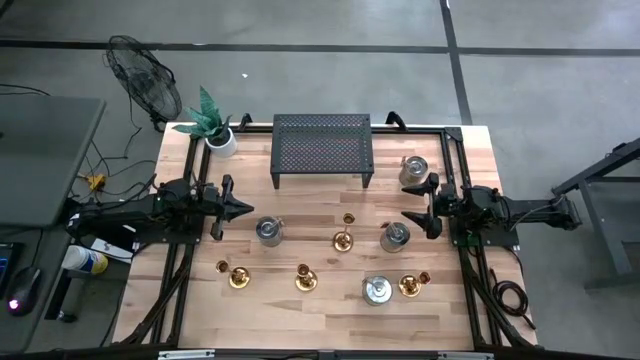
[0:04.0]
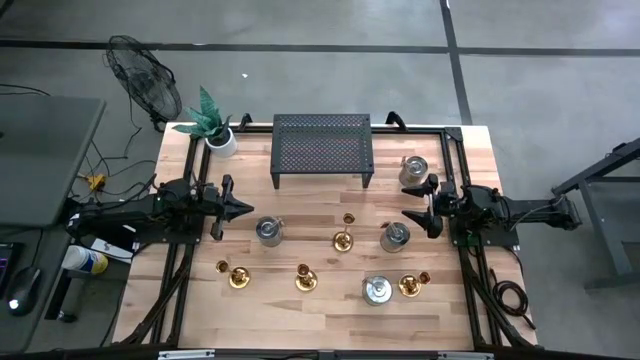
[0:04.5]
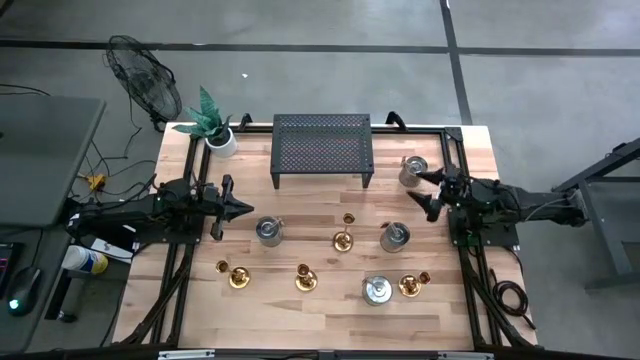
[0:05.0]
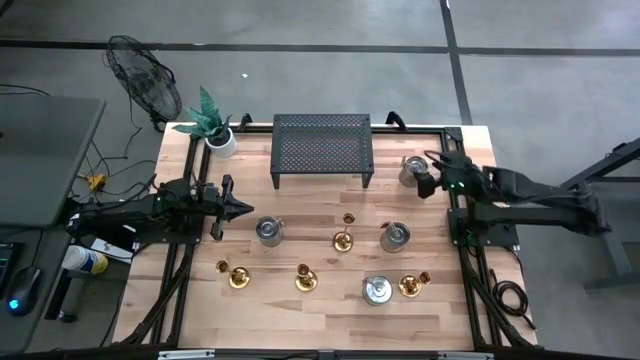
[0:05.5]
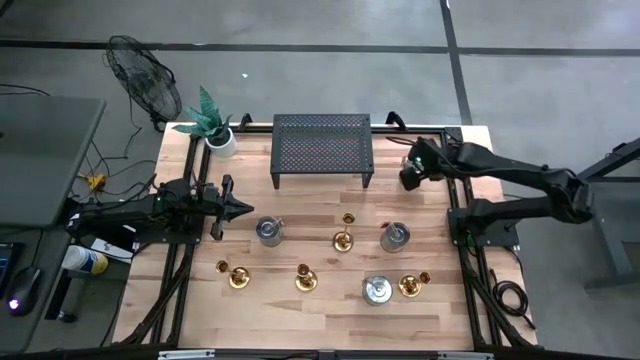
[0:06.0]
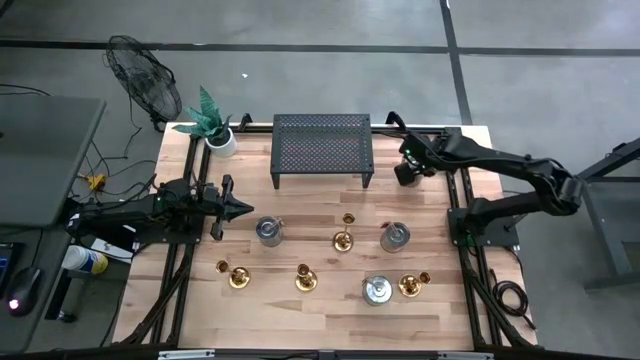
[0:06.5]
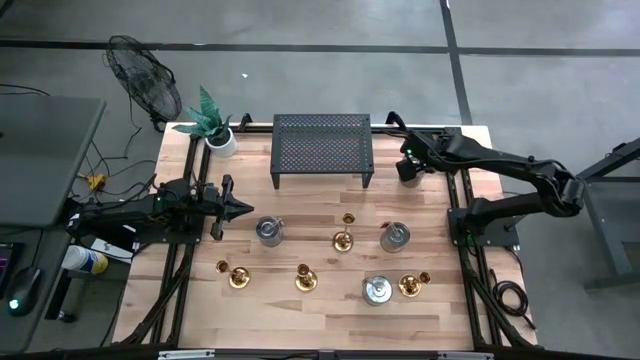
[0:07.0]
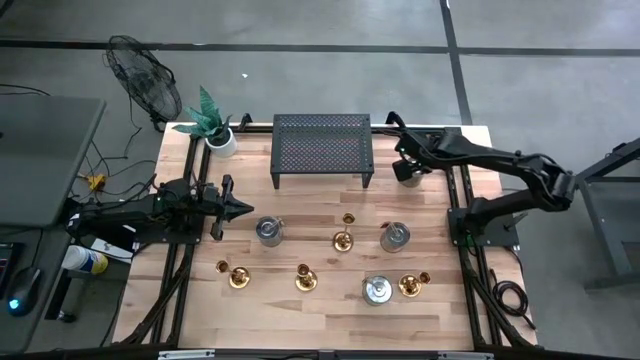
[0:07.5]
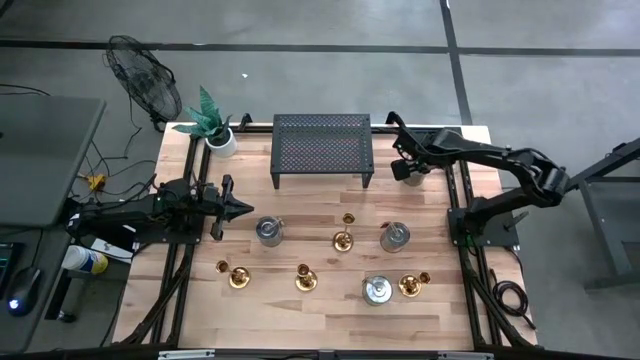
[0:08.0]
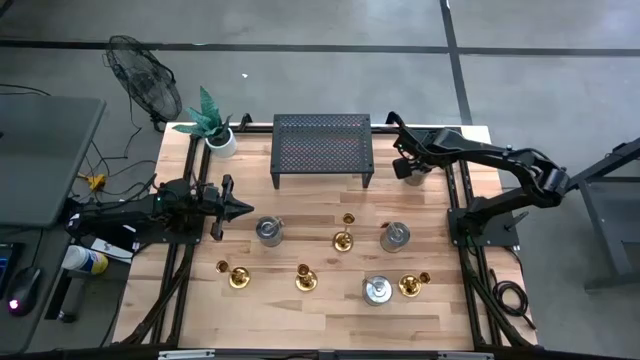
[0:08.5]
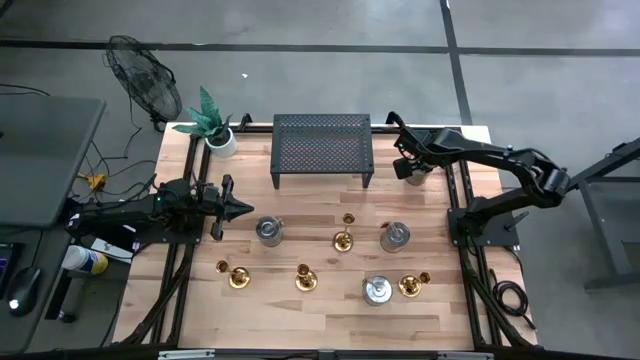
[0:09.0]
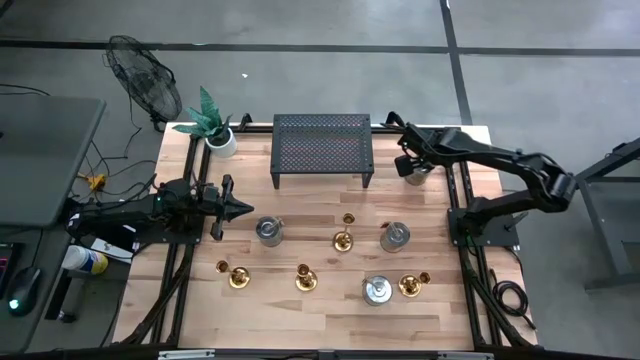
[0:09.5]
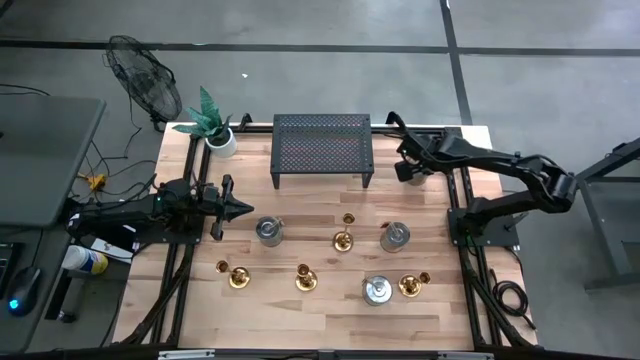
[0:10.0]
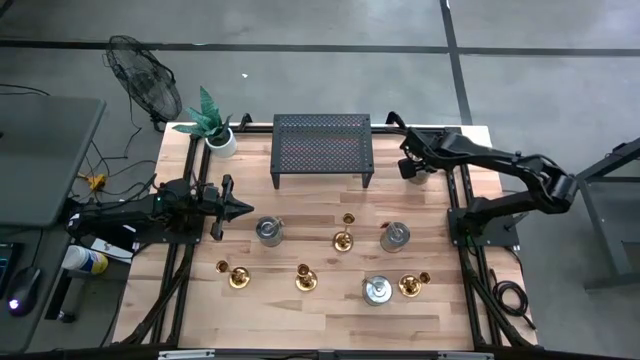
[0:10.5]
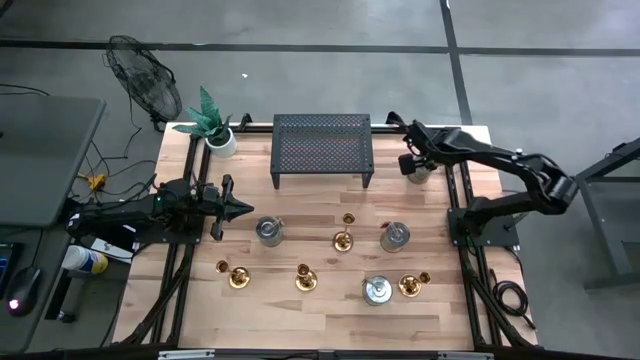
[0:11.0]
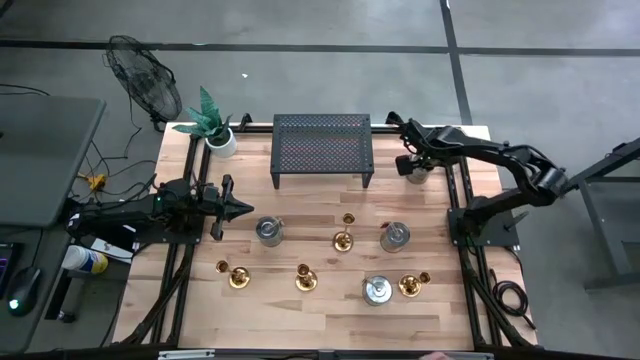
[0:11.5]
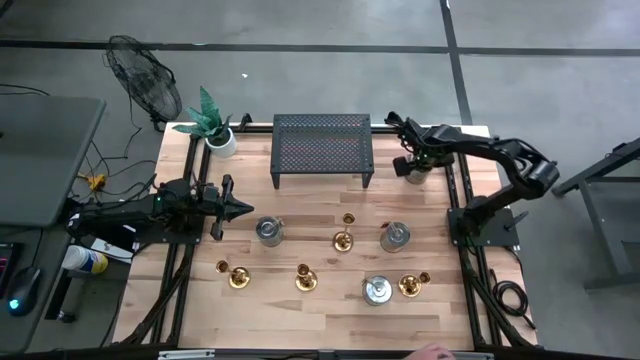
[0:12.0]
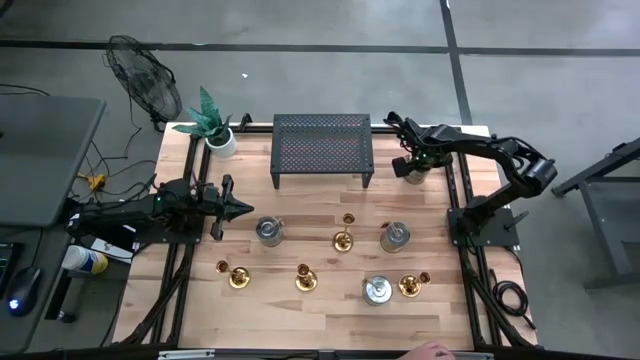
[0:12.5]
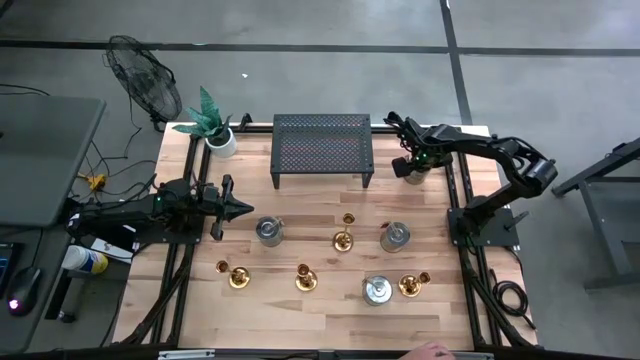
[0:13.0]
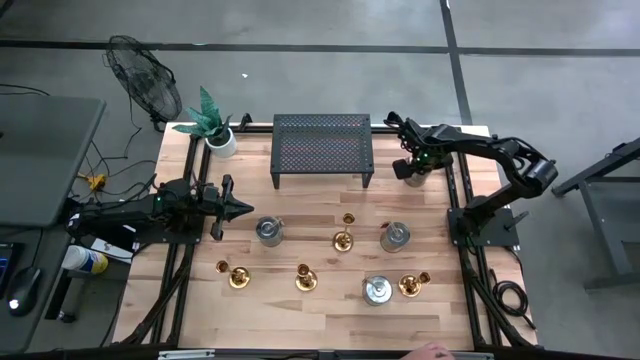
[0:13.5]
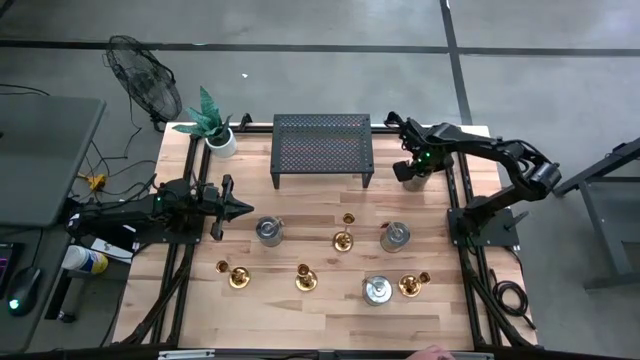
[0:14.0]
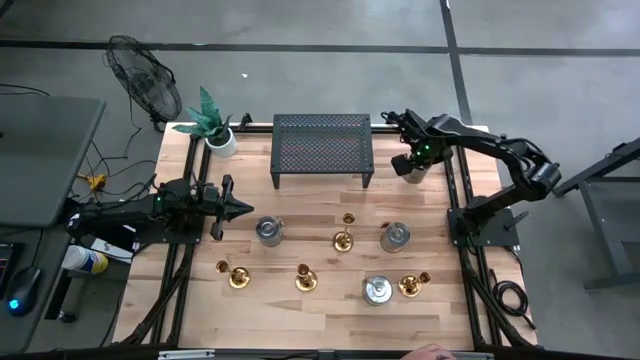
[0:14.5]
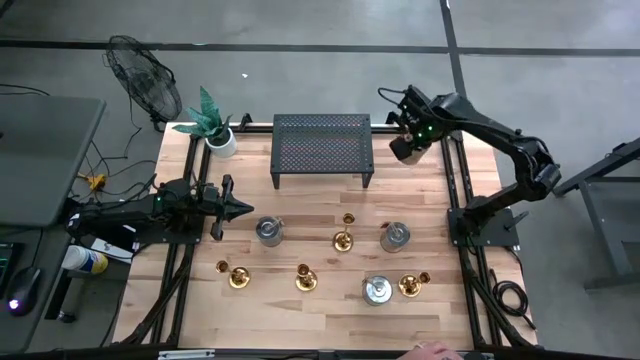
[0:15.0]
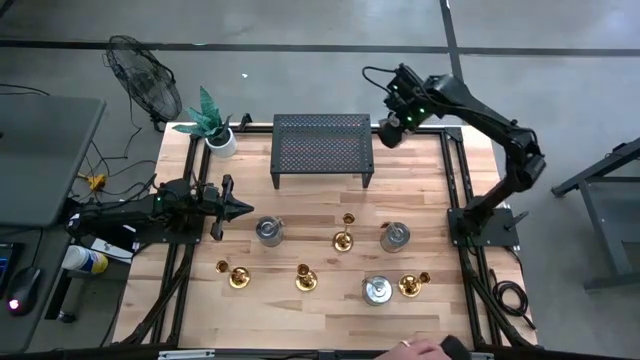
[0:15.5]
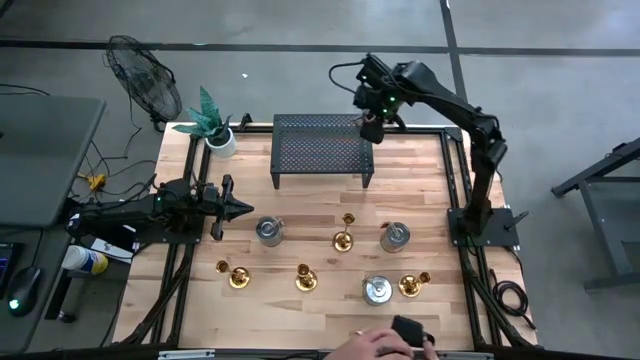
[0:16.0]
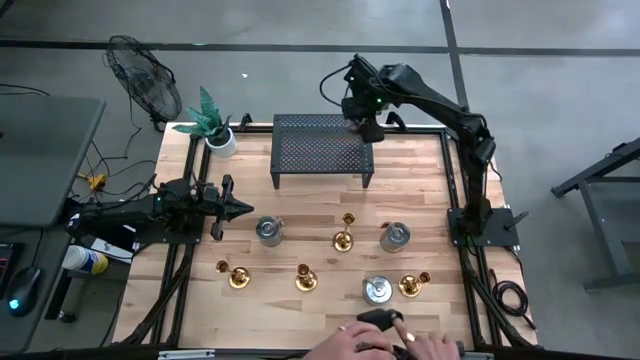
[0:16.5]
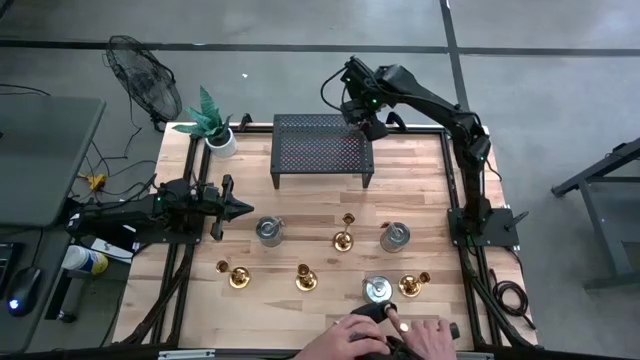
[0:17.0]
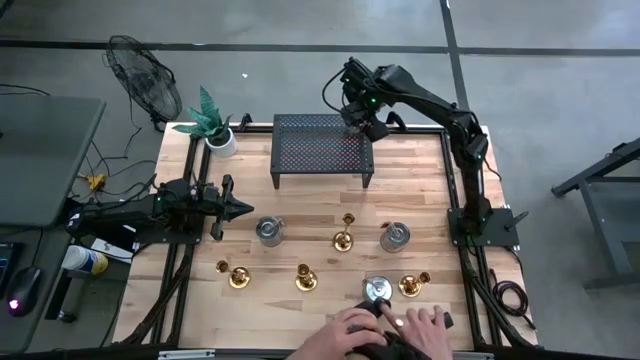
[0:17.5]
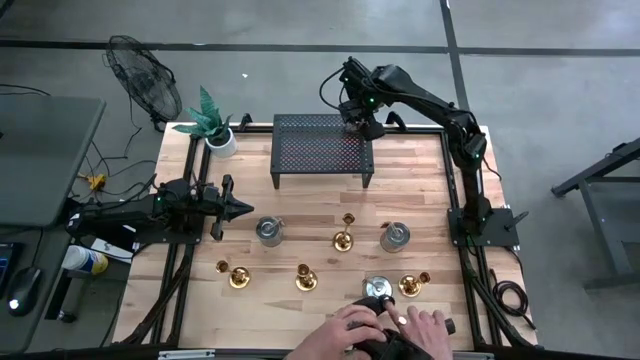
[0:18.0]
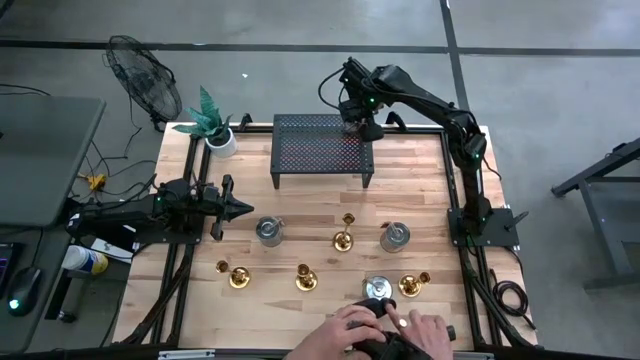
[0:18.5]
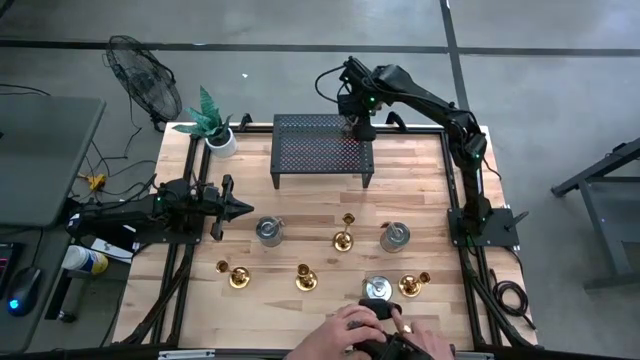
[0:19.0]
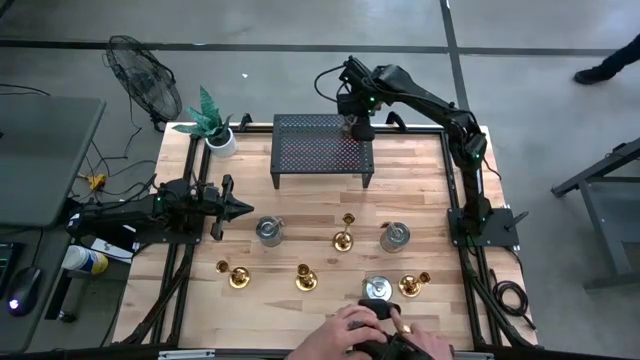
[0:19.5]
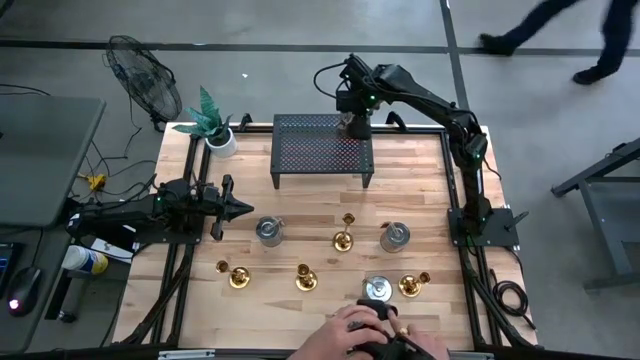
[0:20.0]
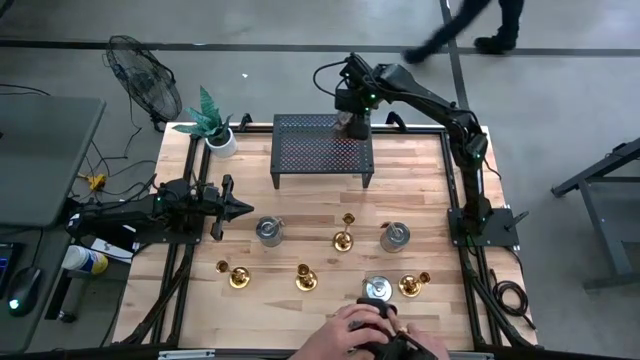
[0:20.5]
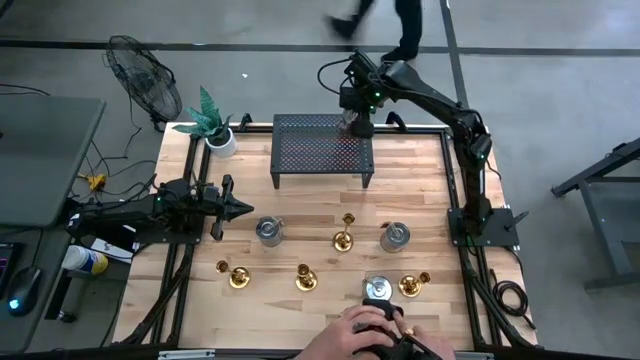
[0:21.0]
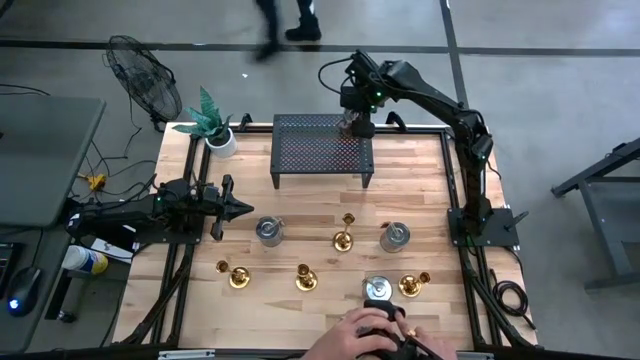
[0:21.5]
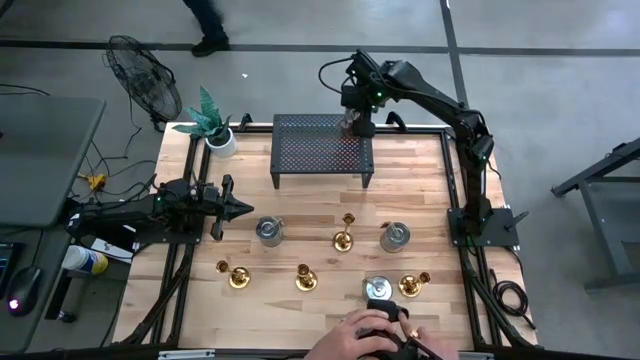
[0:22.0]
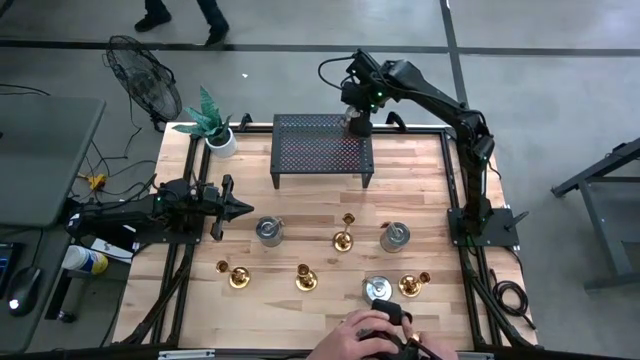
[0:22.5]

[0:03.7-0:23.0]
Task: Pick & Place candle stick holders
Put the brown scented candle on the shelf

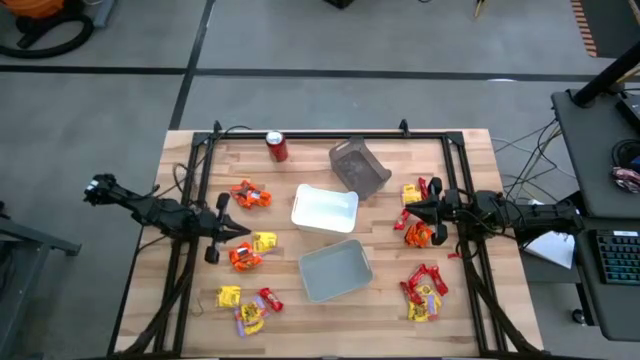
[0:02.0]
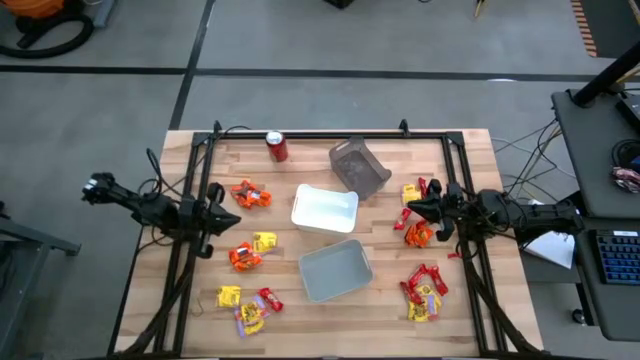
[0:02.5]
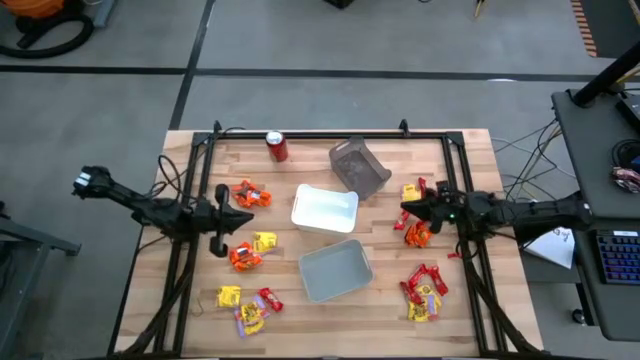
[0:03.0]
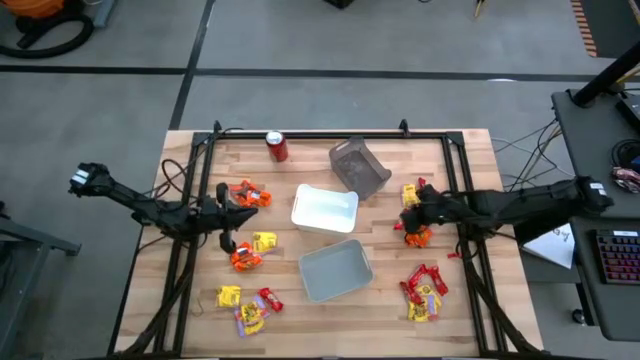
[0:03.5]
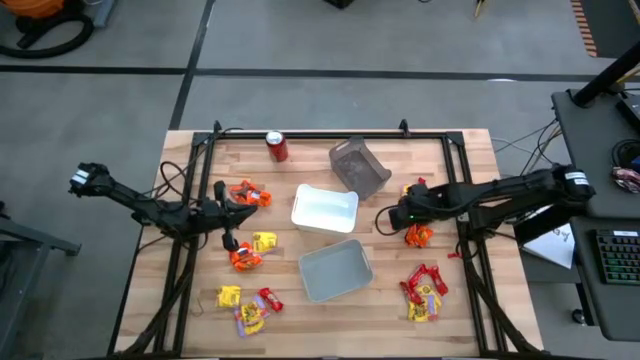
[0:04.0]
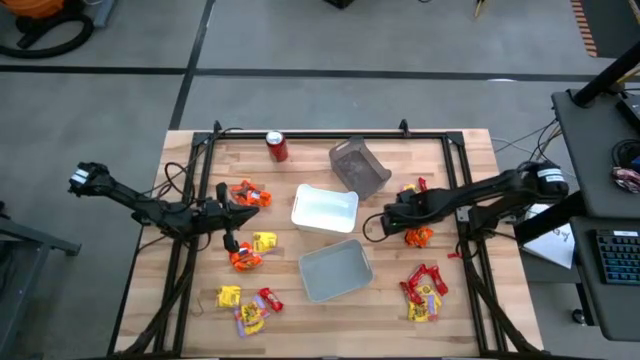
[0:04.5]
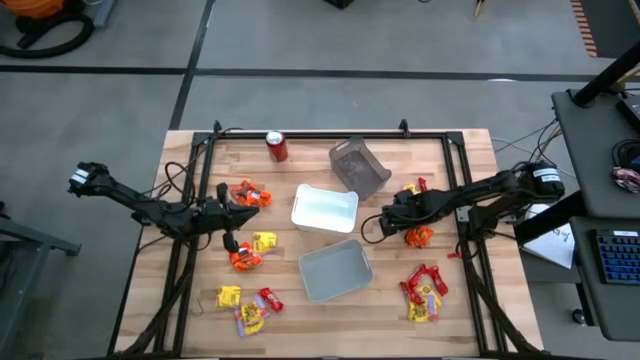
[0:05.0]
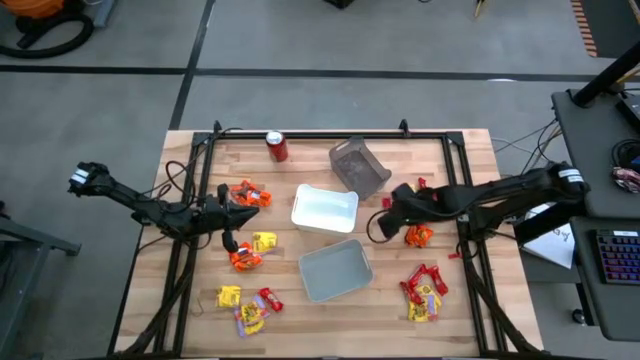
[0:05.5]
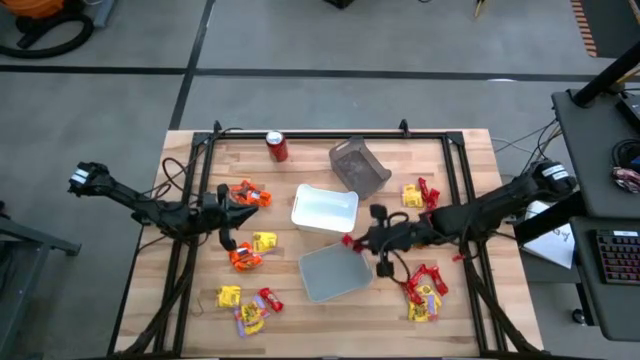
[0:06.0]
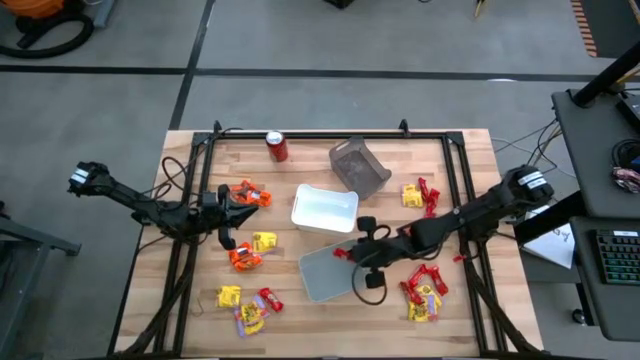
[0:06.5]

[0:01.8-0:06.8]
Task: Sort candy
Put the red chocolate pack into the gray bin
